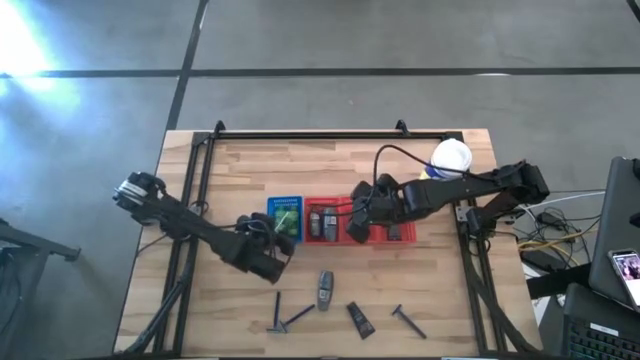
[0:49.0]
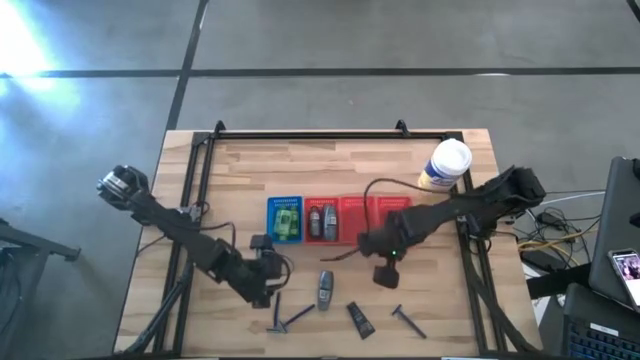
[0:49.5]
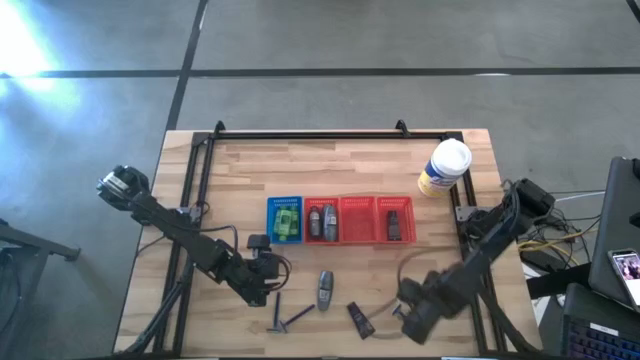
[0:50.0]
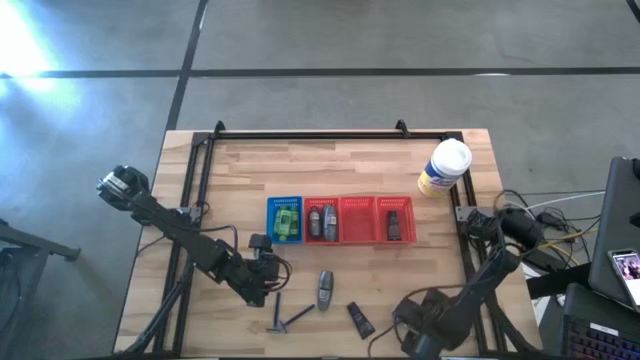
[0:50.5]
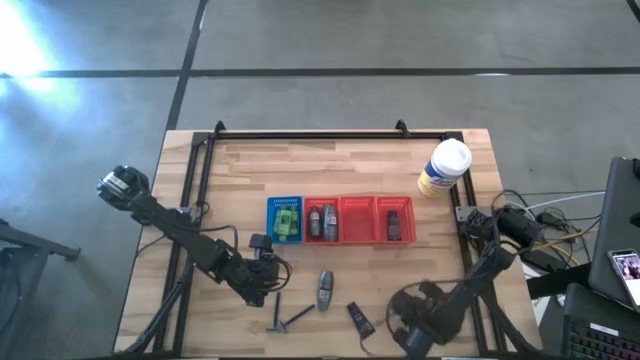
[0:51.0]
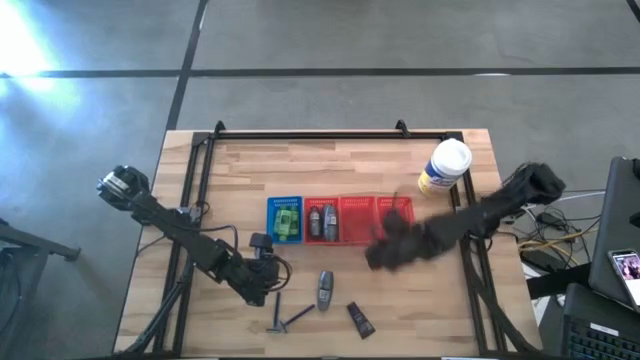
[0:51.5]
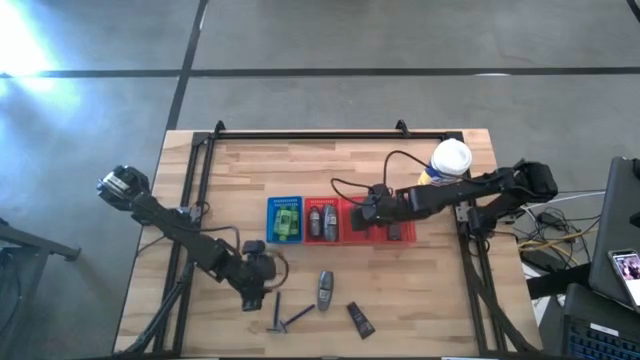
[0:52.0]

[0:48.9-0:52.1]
Task: Pick & Place Travel size toiletries
Put the blue razor into the middle red bin

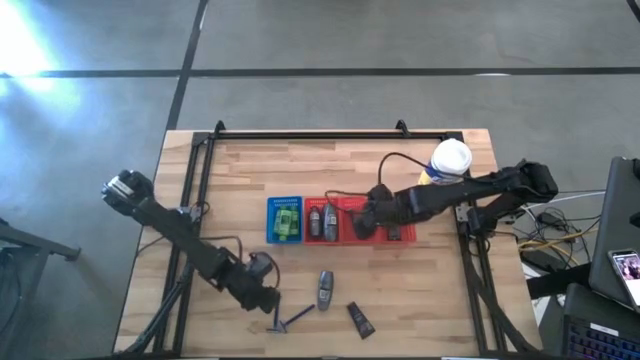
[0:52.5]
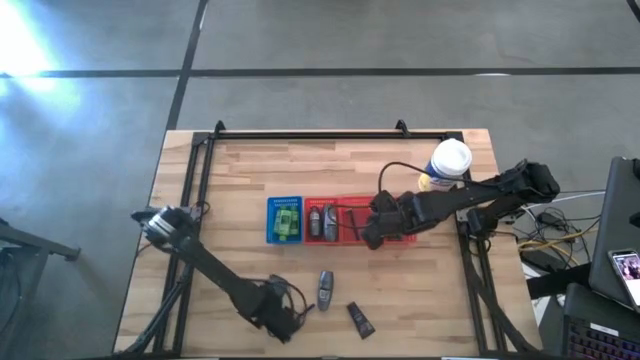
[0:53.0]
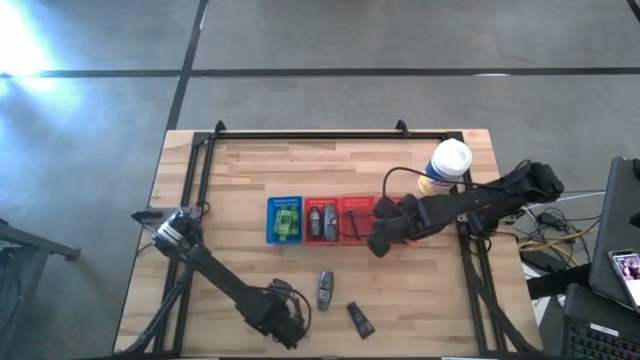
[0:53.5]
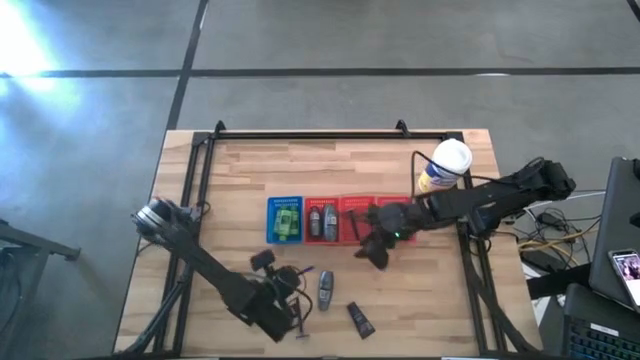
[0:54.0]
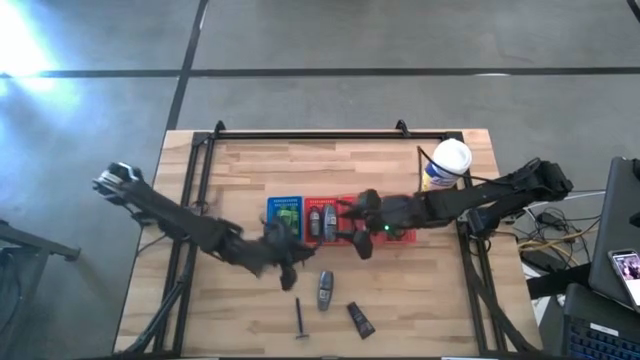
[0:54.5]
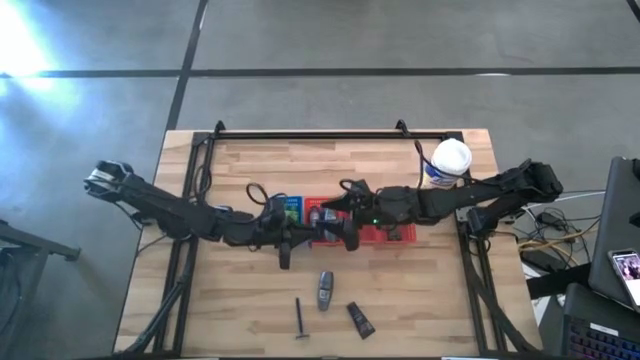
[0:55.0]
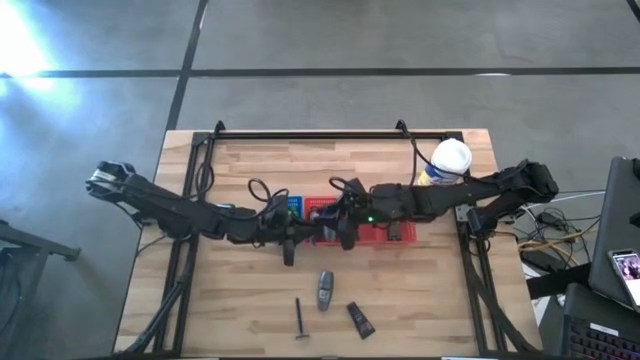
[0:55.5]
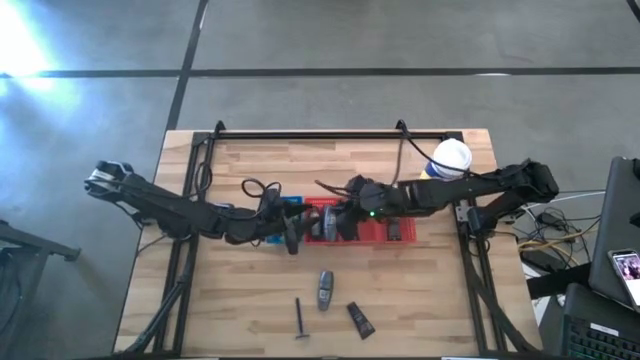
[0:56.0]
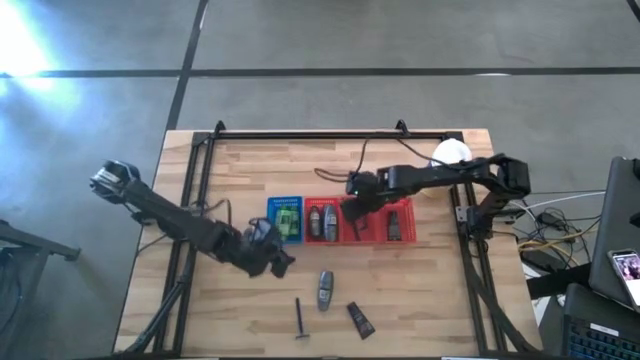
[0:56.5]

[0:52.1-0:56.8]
Put the blue razor into the middle red bin

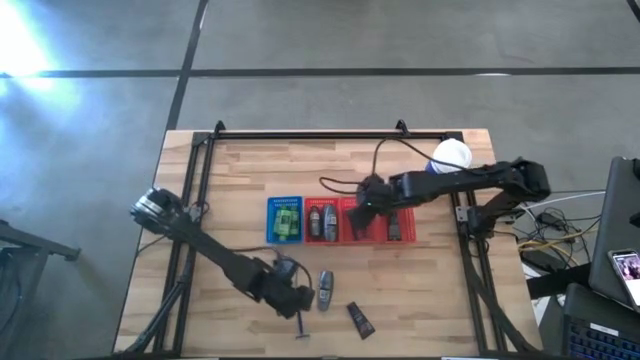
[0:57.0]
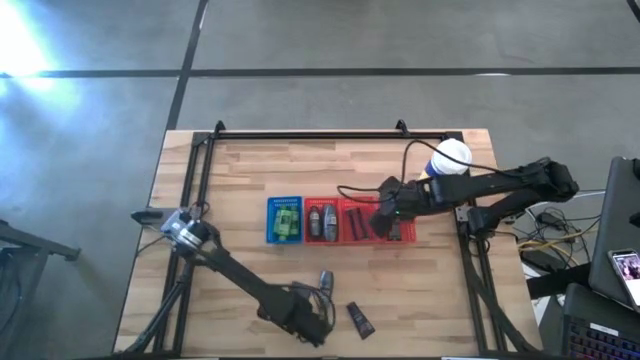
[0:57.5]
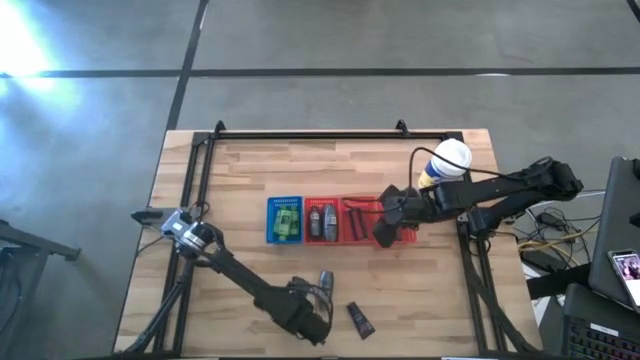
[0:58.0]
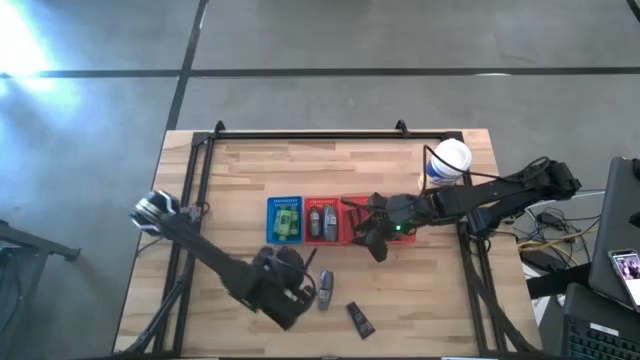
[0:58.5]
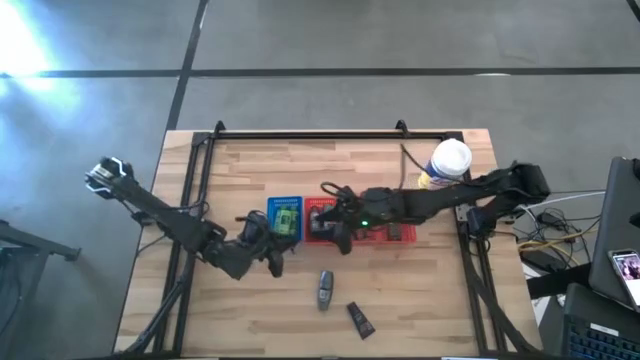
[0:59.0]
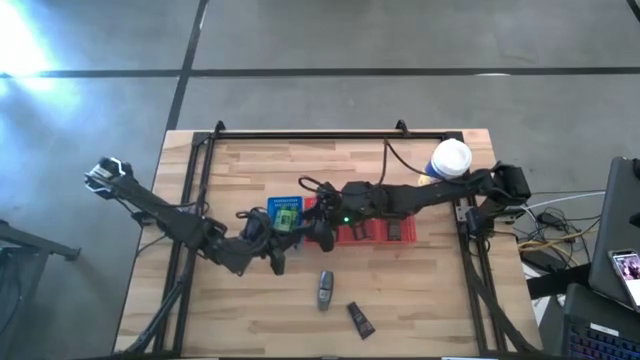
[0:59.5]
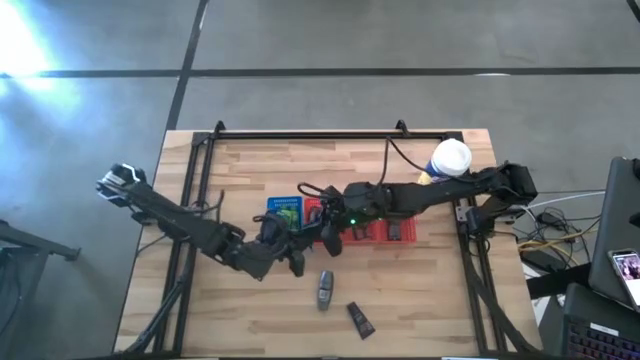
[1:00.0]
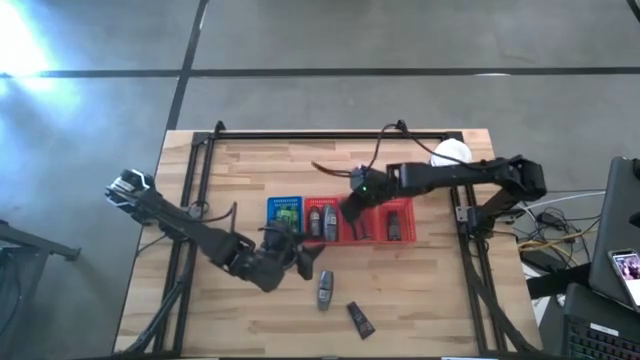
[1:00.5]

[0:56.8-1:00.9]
Put the blue razor into the middle red bin

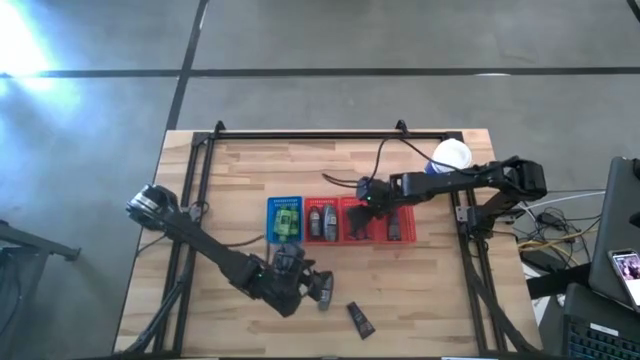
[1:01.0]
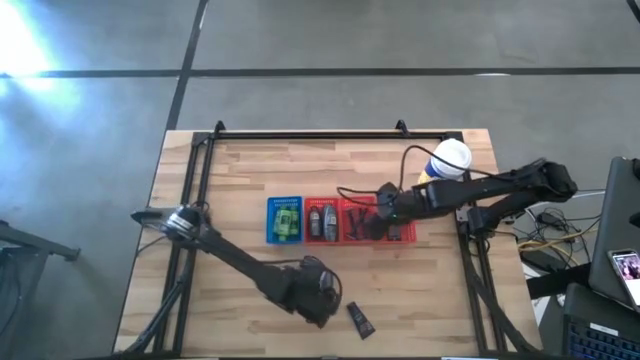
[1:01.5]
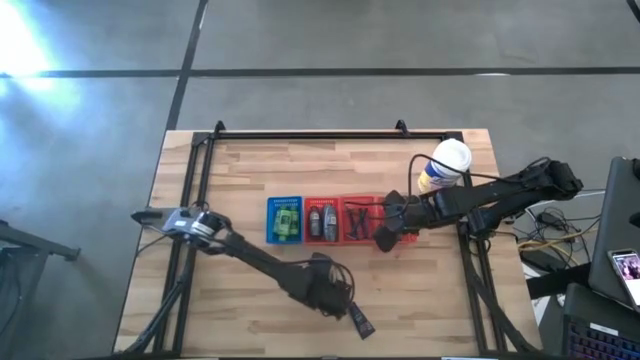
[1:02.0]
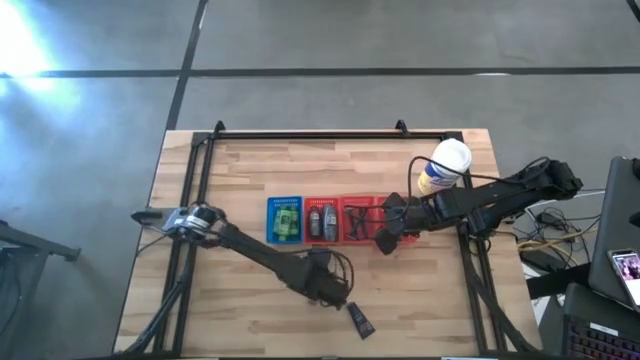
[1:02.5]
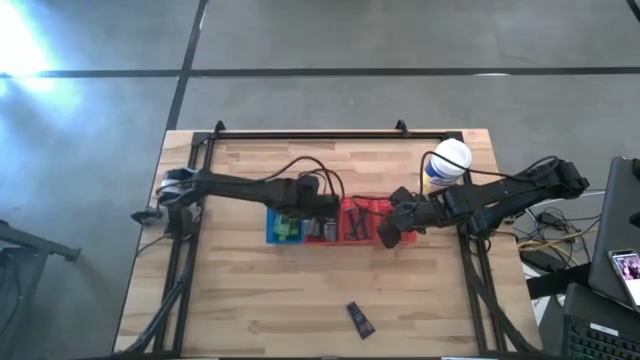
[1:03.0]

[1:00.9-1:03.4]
Put the black deodorant into the left red bin

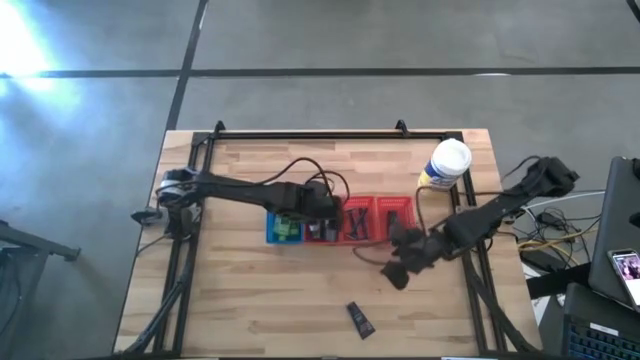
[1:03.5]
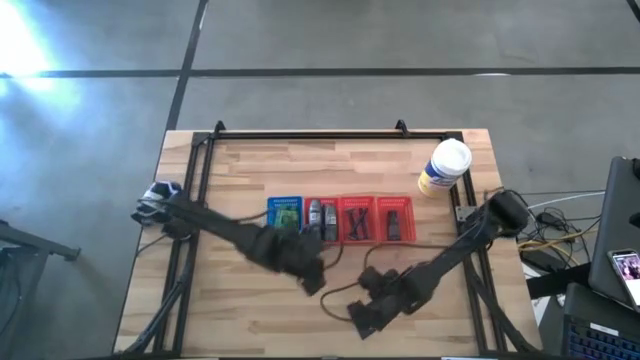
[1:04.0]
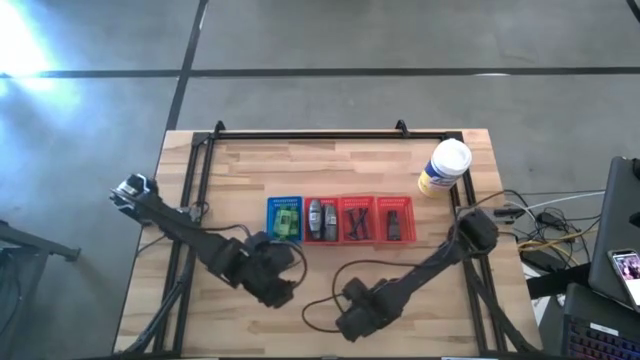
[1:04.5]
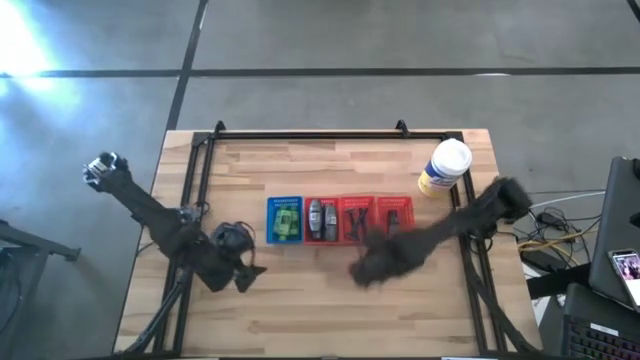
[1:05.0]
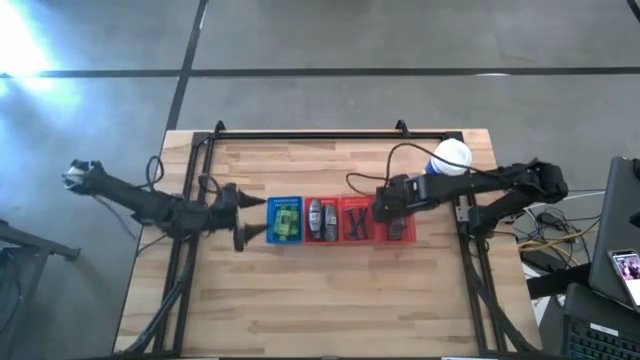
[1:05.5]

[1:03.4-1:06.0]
Put the blue shave cream into the right red bin

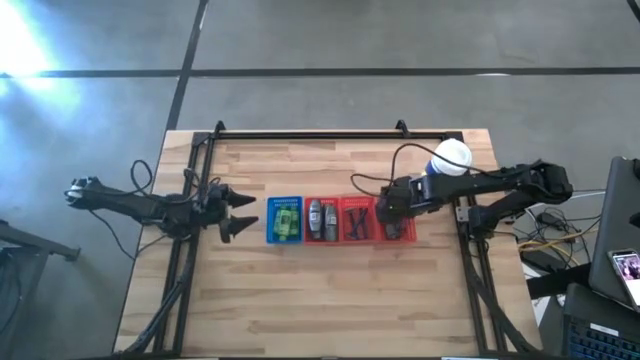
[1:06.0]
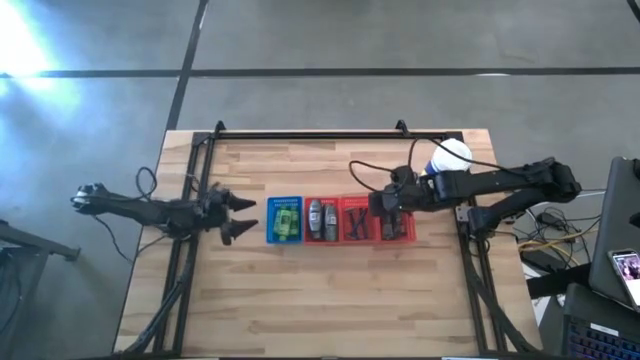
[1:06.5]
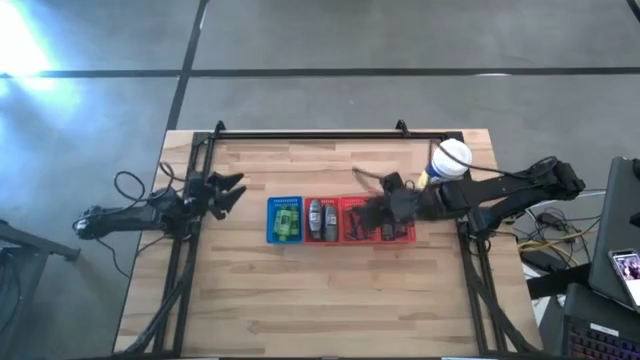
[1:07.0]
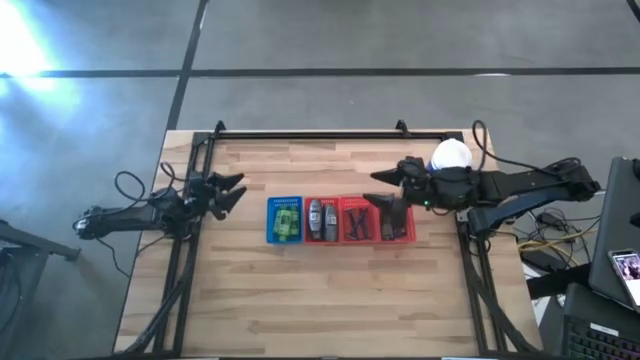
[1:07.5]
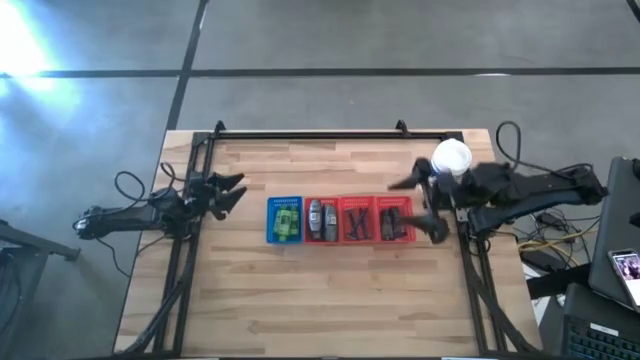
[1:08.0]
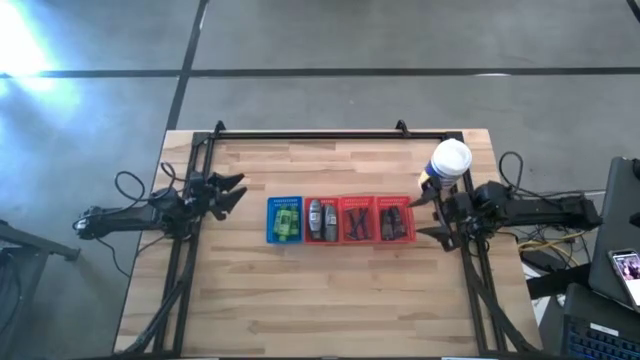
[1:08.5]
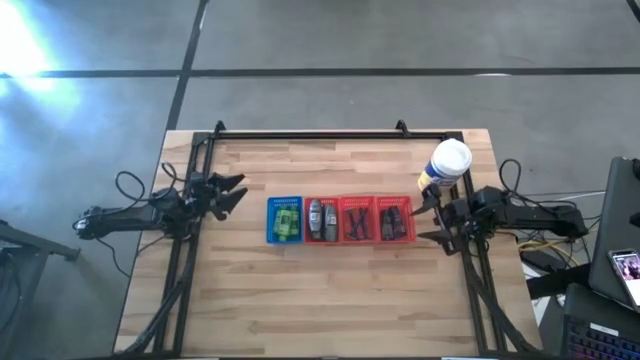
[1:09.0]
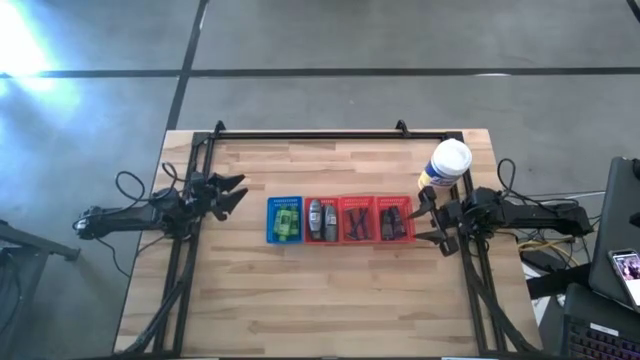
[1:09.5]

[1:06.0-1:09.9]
Return to Home Position
